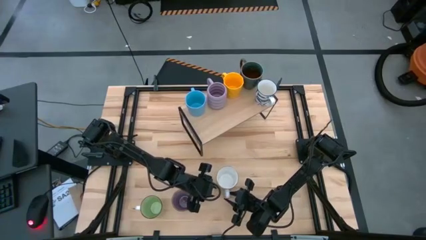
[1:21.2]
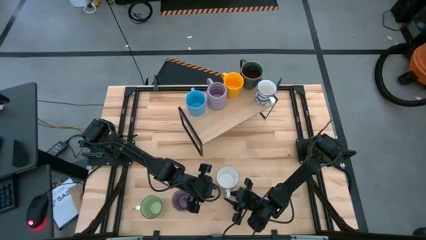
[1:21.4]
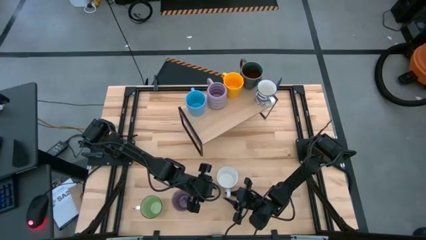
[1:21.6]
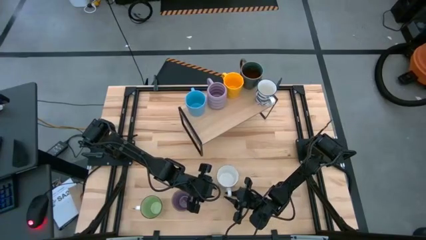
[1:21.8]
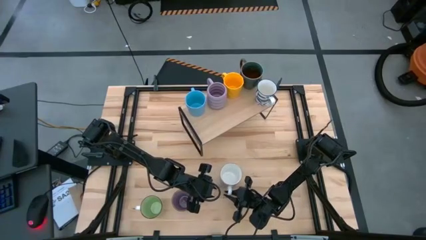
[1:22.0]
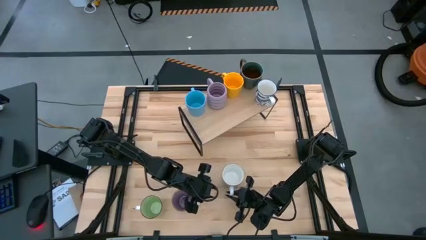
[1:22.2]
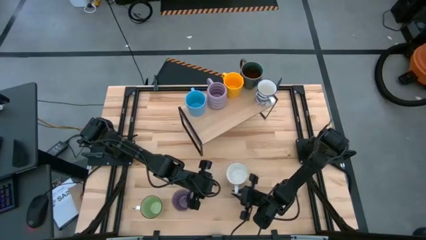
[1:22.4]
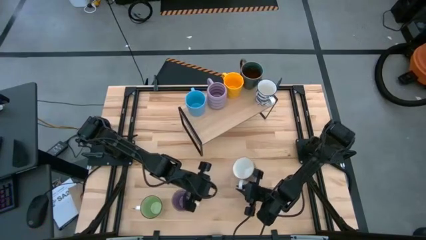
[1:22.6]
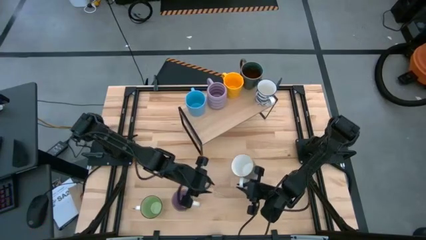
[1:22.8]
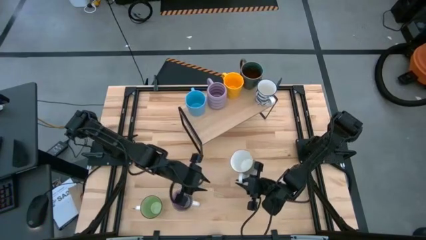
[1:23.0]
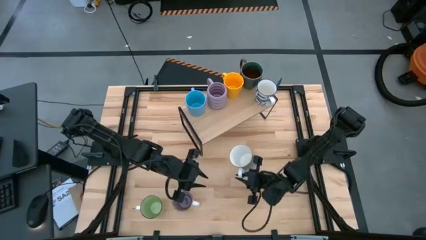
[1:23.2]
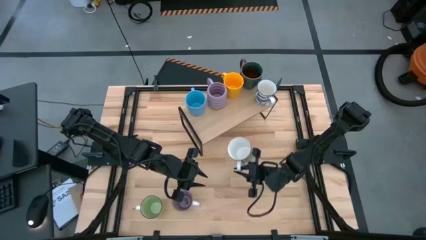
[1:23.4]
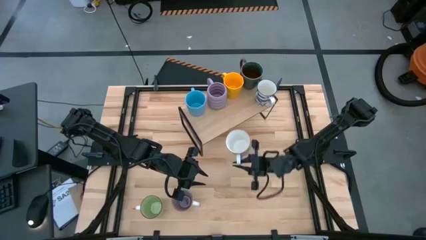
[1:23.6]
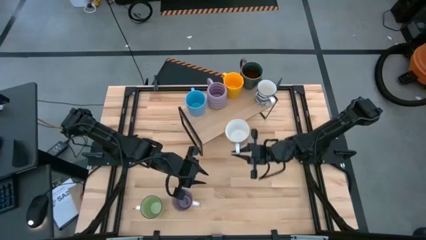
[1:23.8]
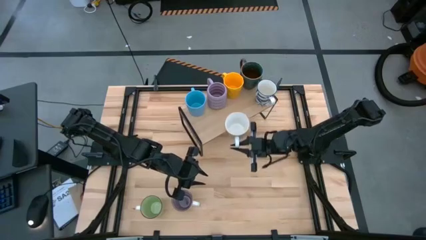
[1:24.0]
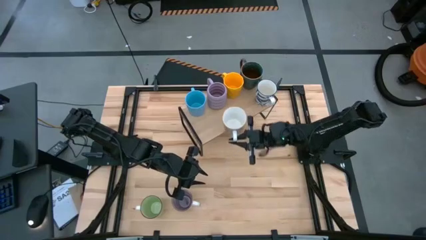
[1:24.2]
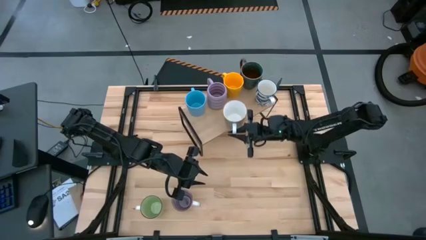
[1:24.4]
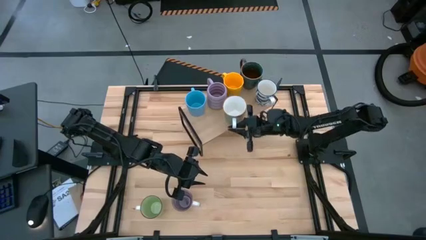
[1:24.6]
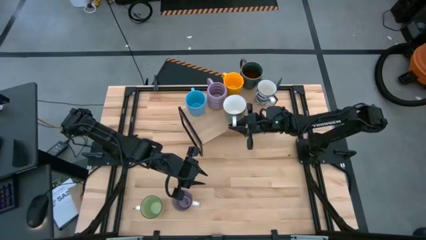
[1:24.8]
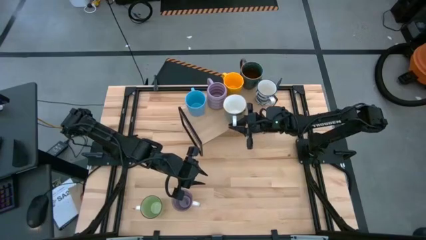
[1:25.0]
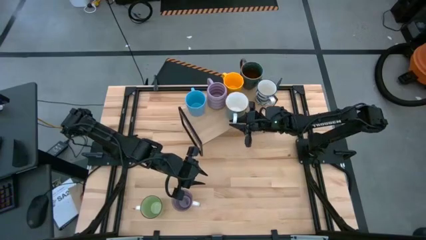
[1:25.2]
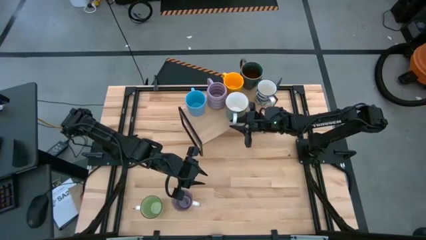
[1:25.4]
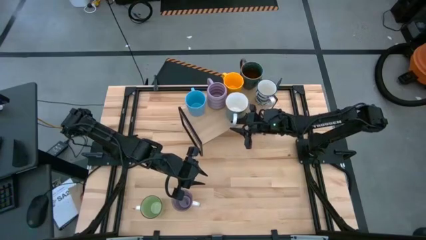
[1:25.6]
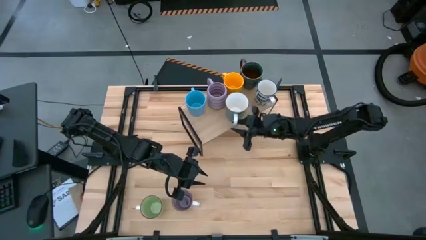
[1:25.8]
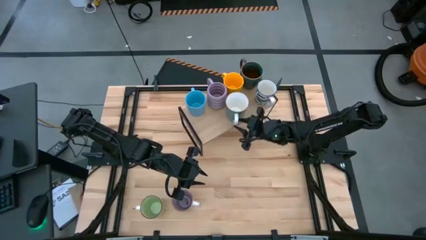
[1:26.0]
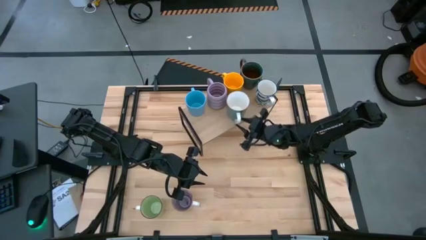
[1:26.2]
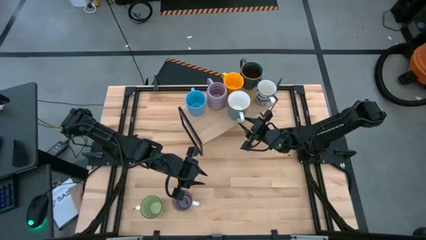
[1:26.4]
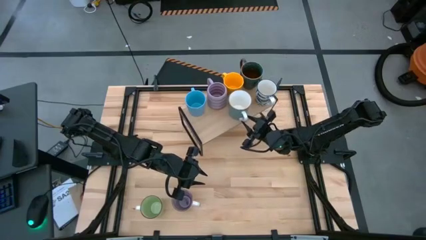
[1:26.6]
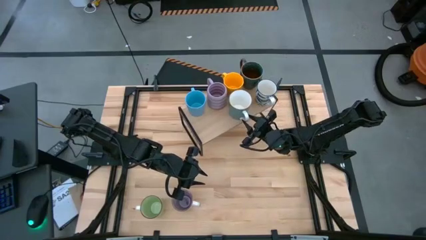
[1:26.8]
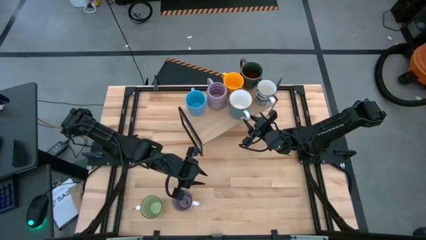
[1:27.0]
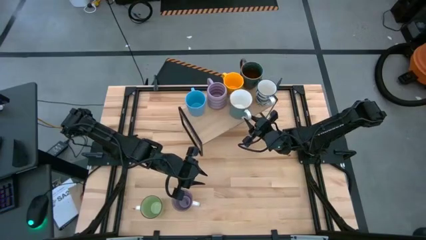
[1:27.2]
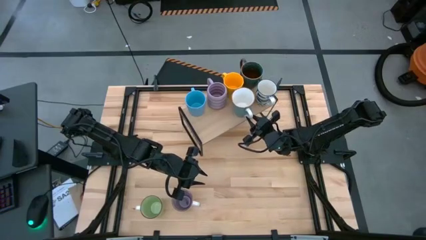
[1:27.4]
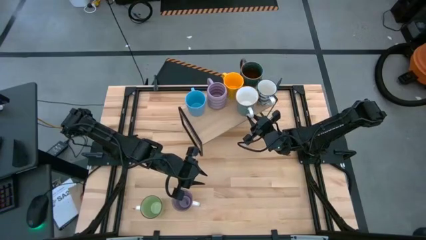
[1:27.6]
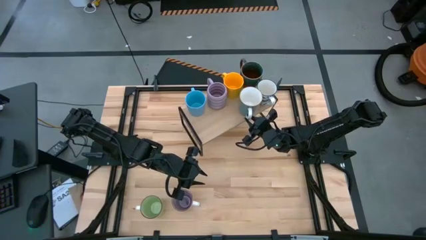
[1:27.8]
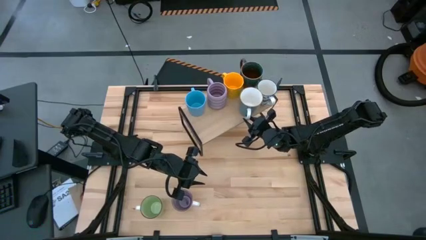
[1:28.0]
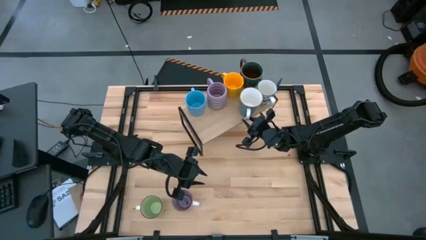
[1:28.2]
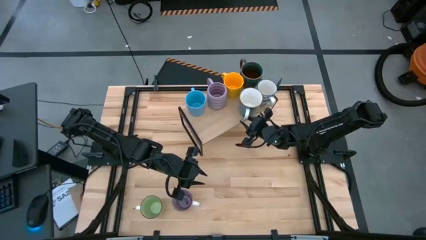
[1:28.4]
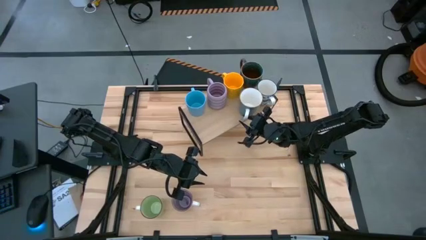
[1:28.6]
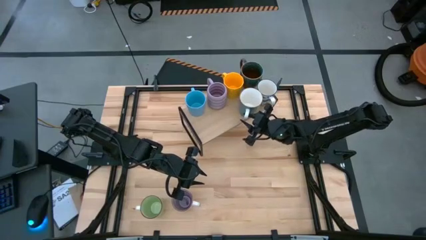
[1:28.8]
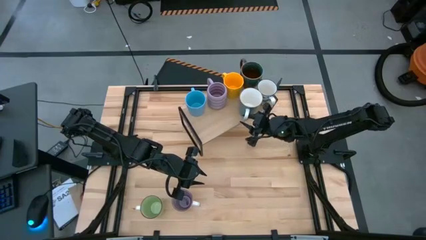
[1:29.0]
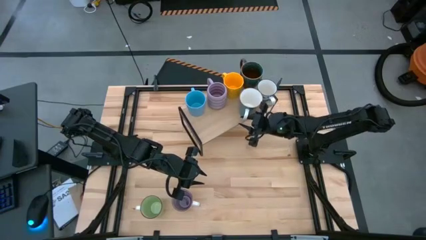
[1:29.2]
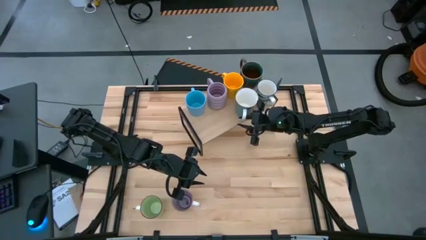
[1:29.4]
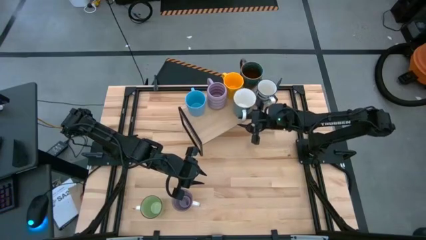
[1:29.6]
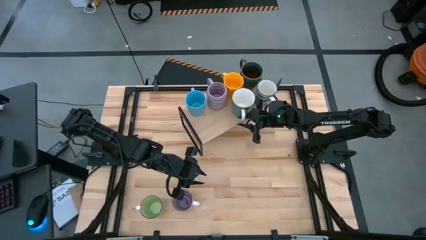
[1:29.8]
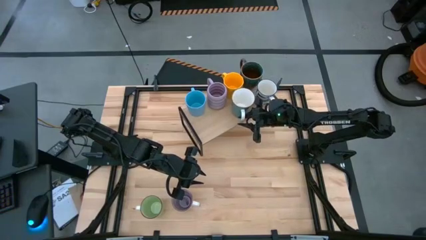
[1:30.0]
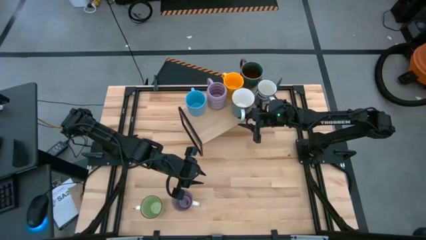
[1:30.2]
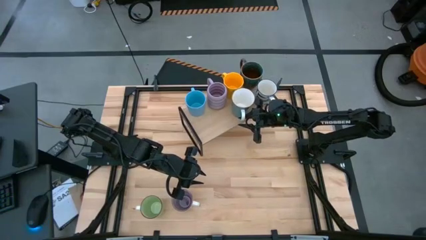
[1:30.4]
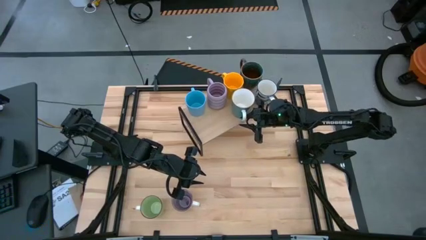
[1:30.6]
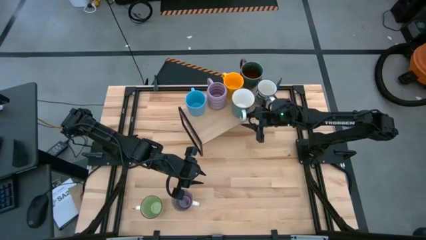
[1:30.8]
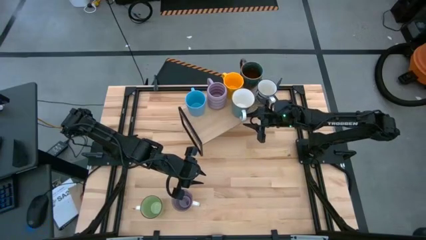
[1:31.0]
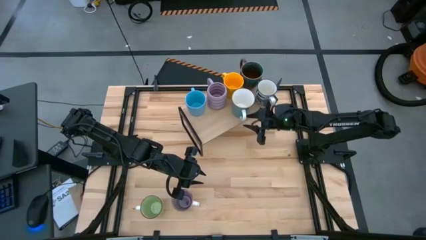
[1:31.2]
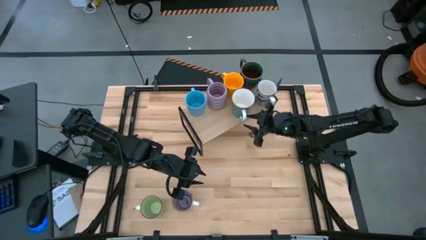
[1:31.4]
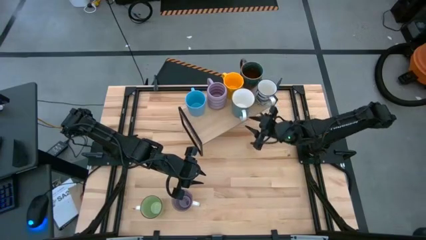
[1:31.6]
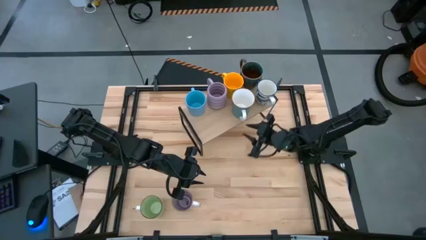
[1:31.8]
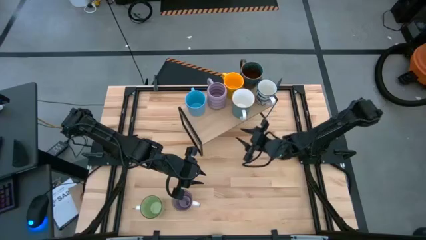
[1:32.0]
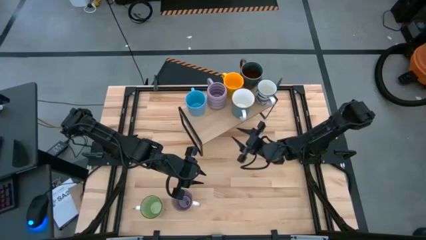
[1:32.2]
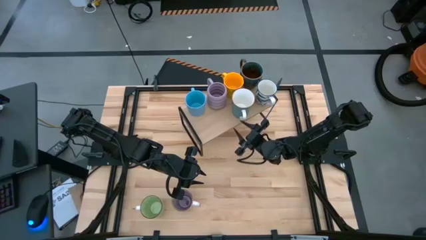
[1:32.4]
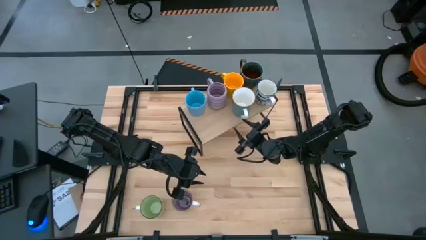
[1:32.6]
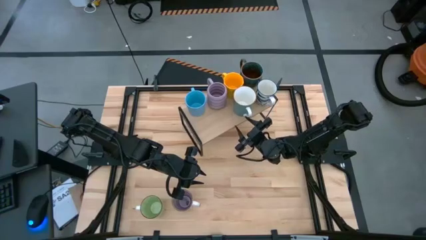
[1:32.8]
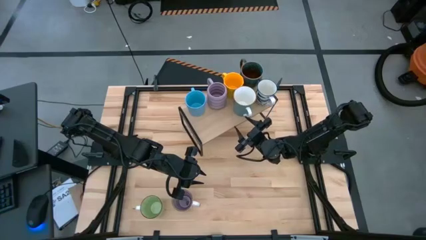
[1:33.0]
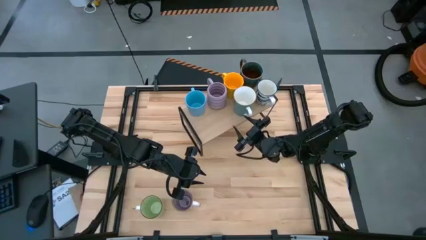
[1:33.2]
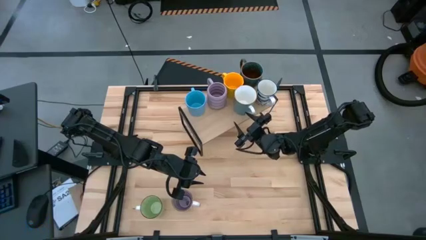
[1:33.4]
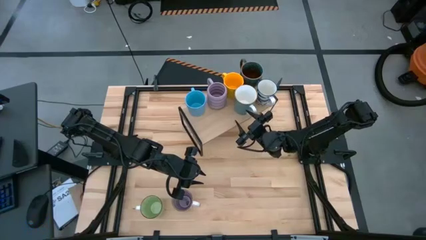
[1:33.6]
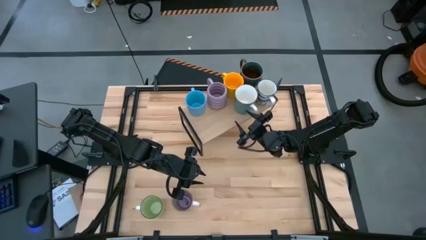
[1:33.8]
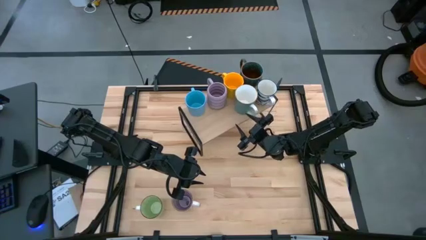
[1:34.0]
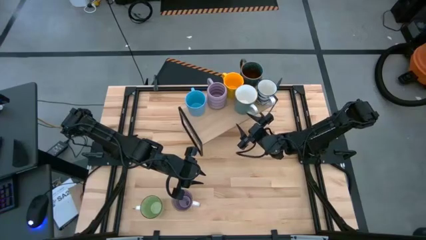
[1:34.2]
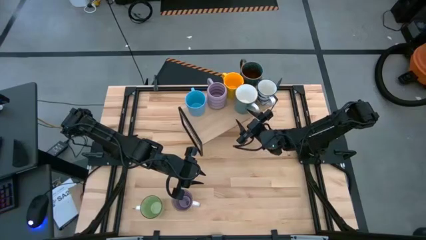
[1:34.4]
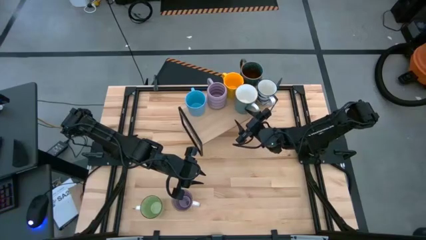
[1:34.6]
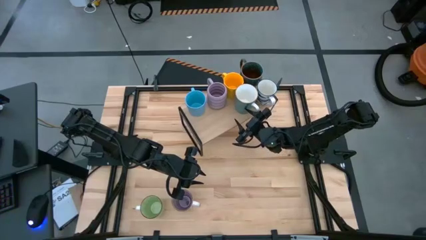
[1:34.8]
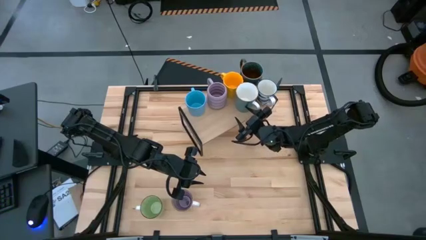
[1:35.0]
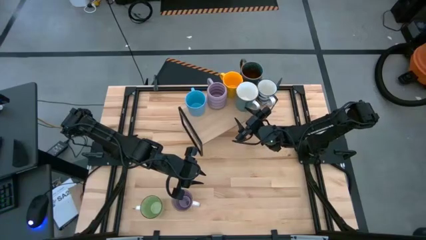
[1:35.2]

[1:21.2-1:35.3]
Task: Place coffee mugs
Put the light green mug on the shelf

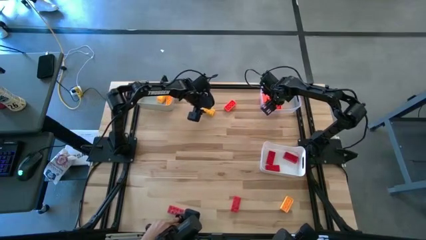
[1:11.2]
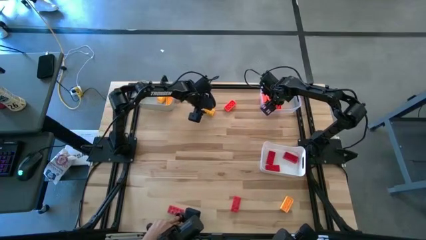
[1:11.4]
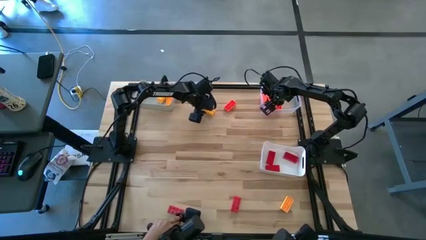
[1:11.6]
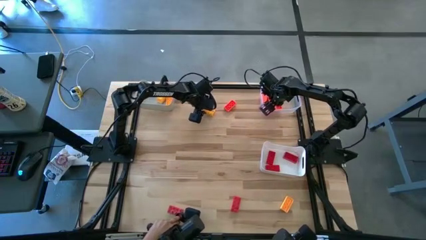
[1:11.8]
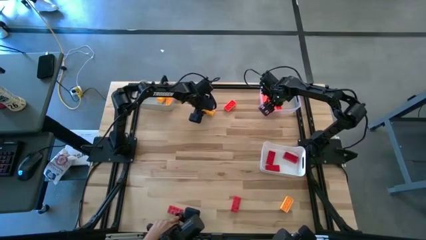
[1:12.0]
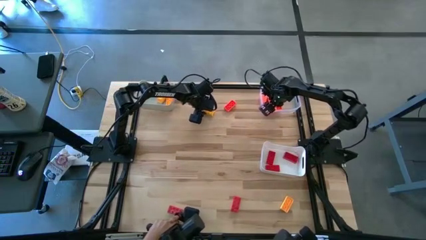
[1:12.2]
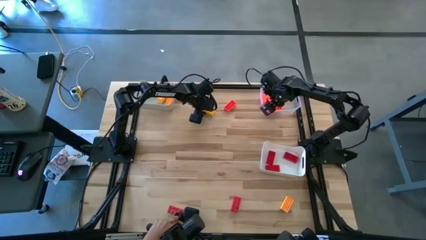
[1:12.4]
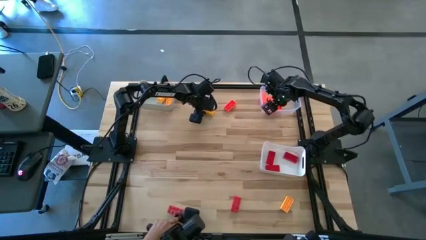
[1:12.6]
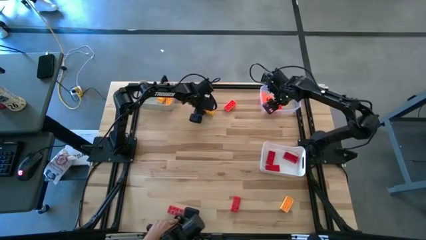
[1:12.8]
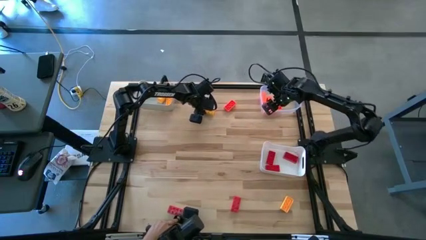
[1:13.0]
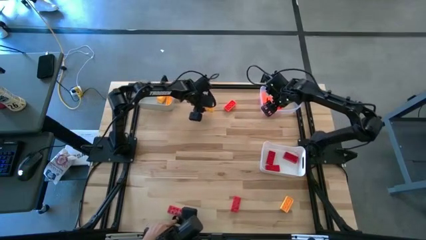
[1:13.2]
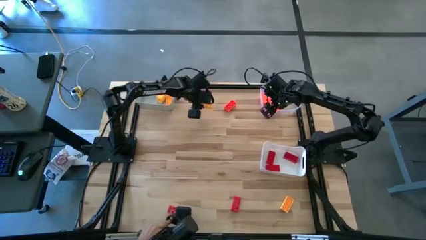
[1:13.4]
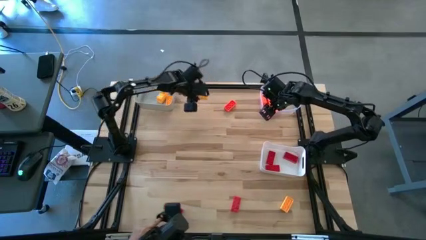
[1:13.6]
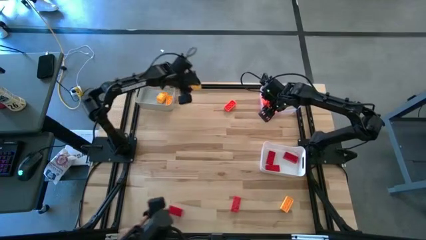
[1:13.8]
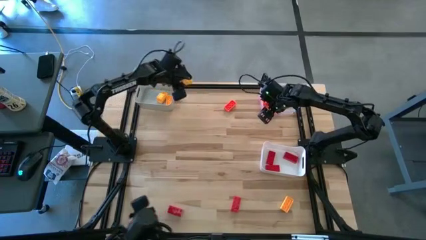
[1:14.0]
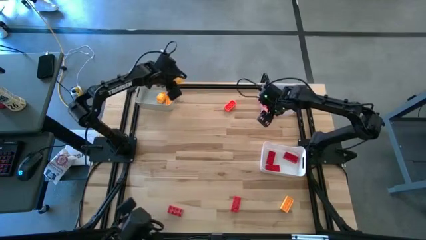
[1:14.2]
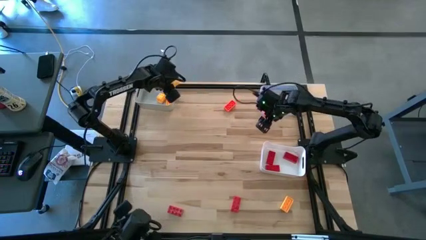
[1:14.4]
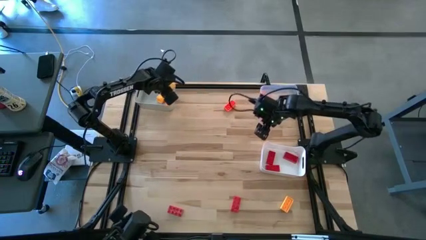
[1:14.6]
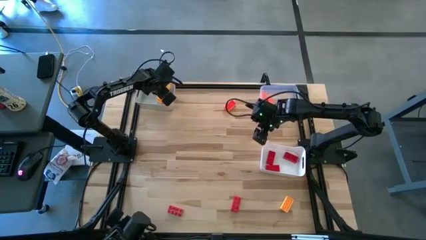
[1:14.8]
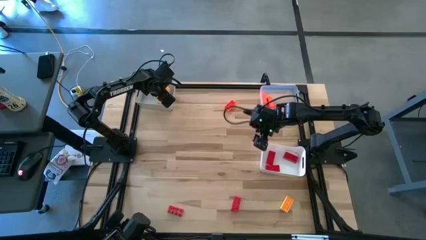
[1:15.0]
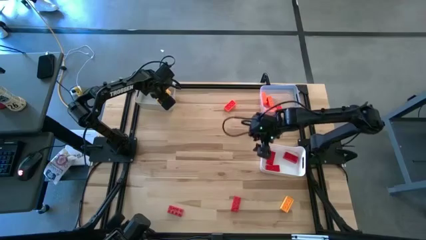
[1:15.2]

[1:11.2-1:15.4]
Task: Sort & place blocks by color
Put the yellow block into the gray bin
